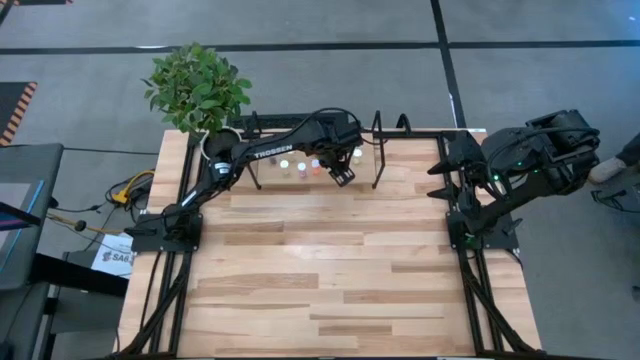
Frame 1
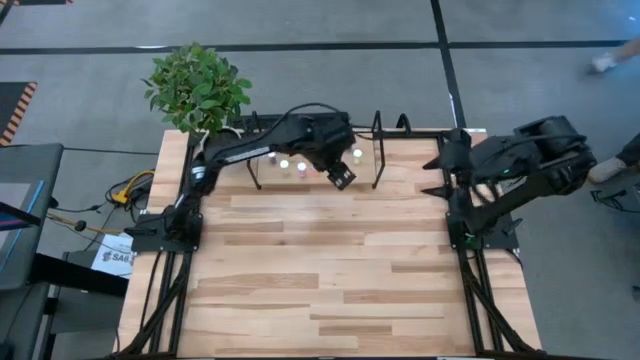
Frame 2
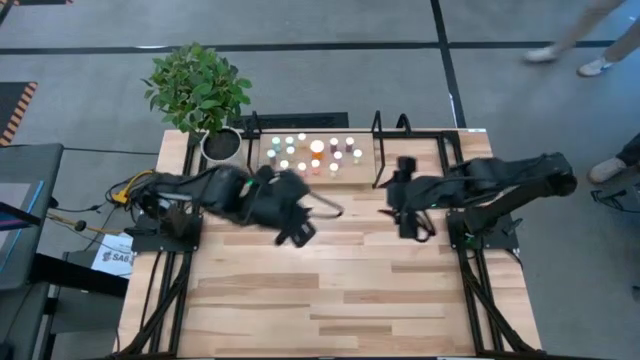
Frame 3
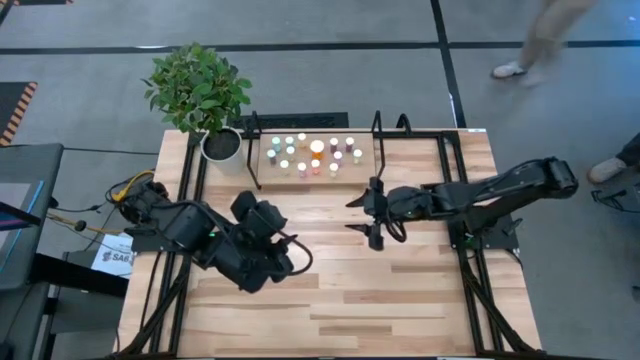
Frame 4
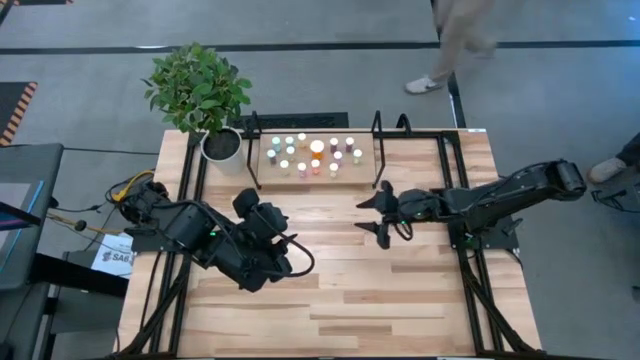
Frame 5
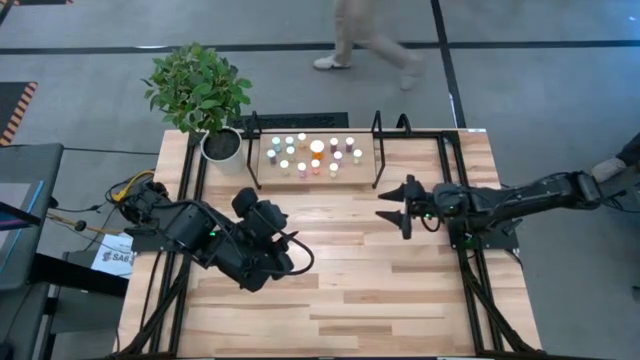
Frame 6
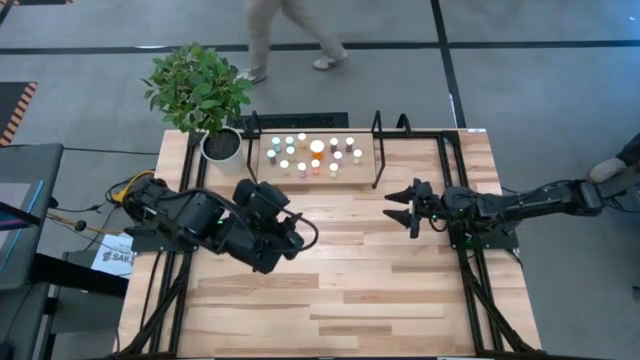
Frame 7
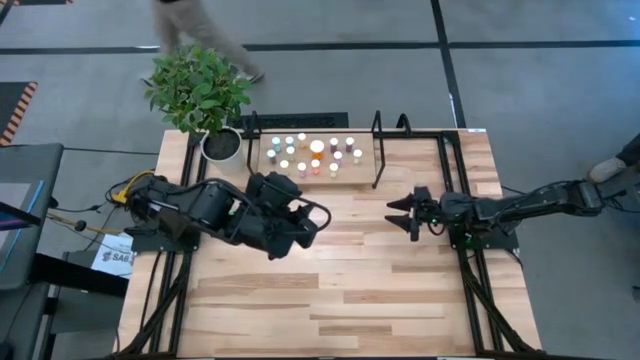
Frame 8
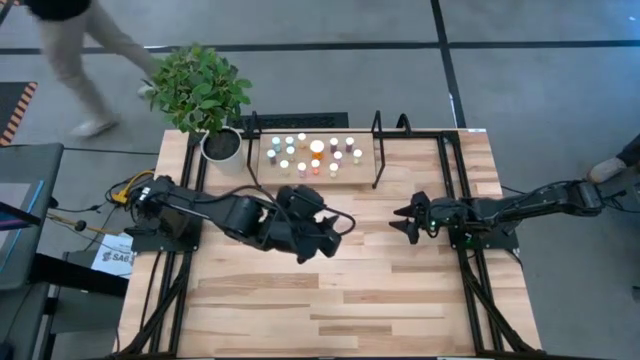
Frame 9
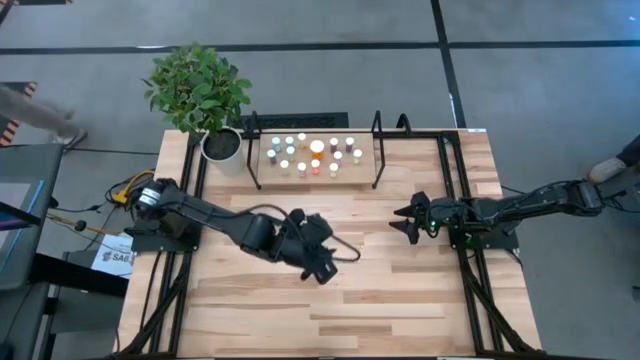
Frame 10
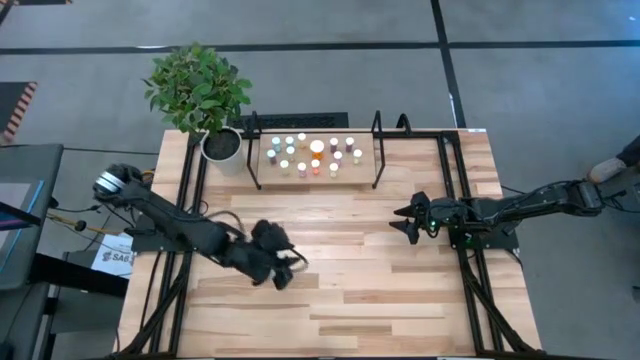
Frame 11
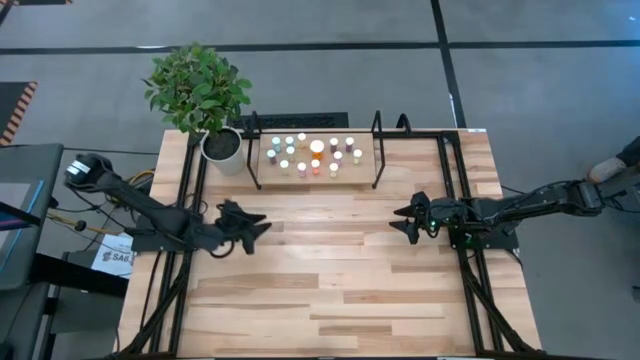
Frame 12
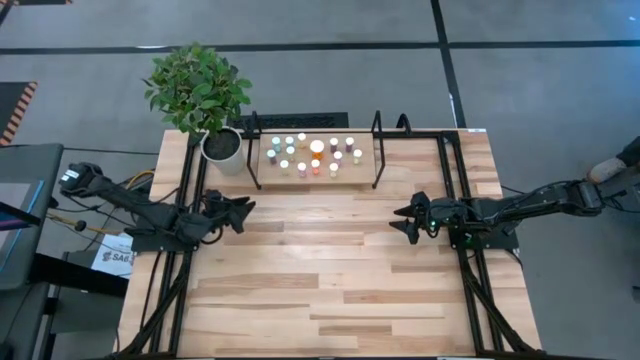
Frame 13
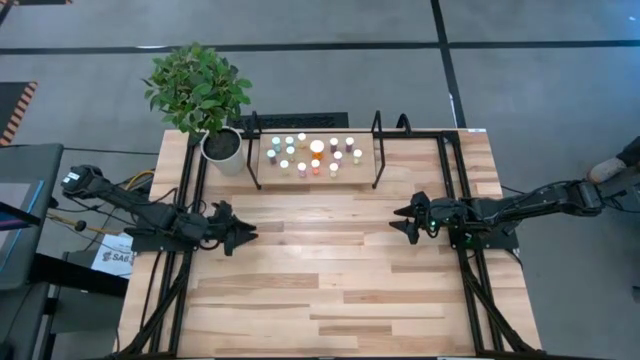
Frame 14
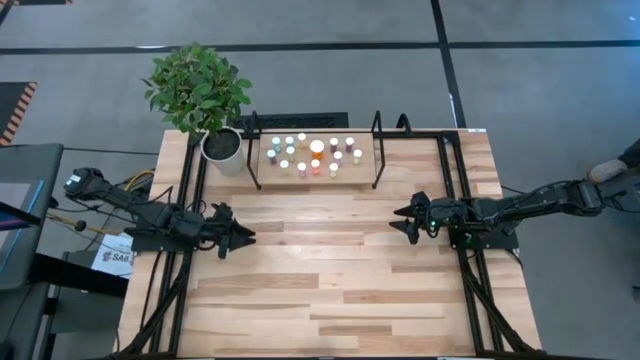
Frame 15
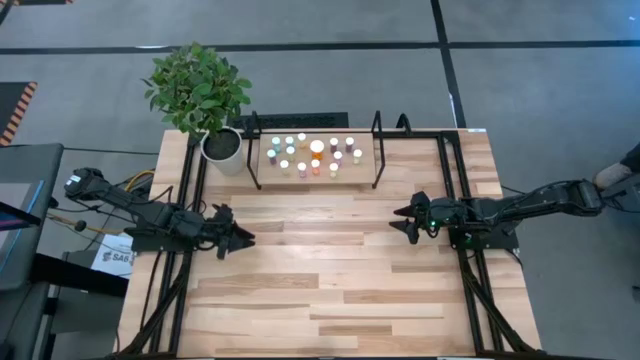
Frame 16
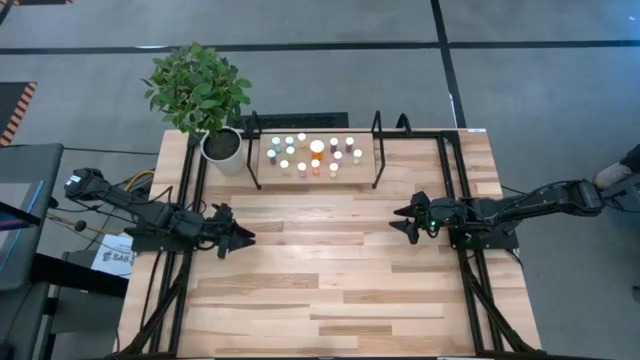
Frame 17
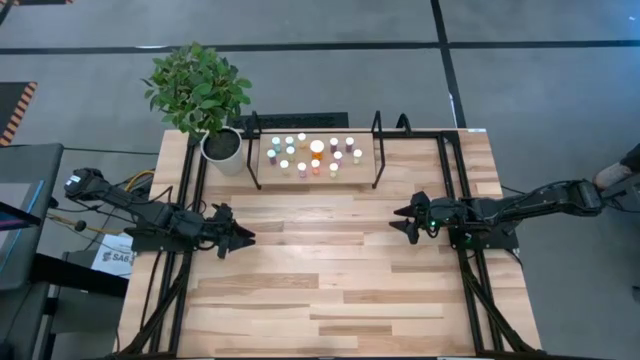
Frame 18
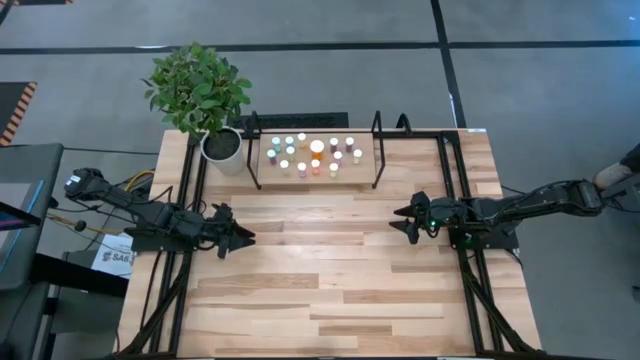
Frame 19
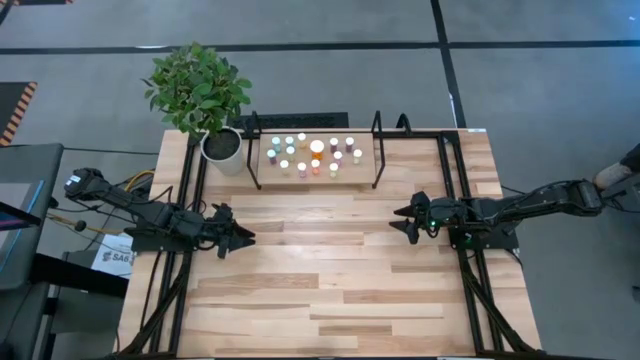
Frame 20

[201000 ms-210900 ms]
Task: Pick and place medicine bottles onto shelf by color
Return to Home Position

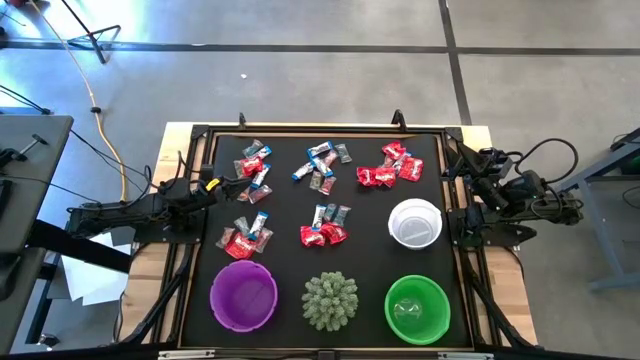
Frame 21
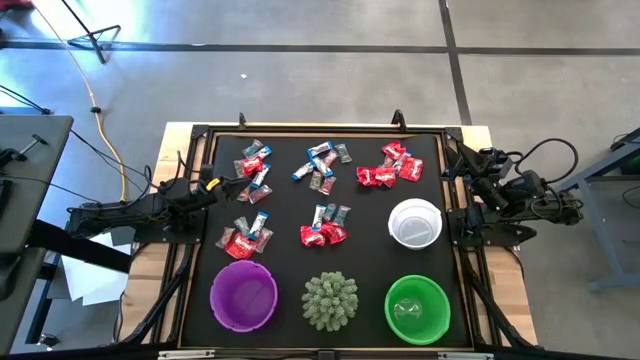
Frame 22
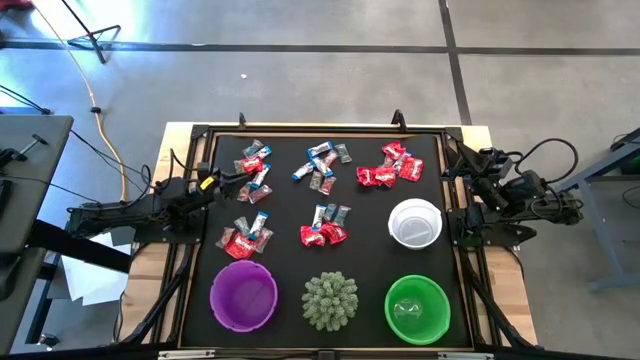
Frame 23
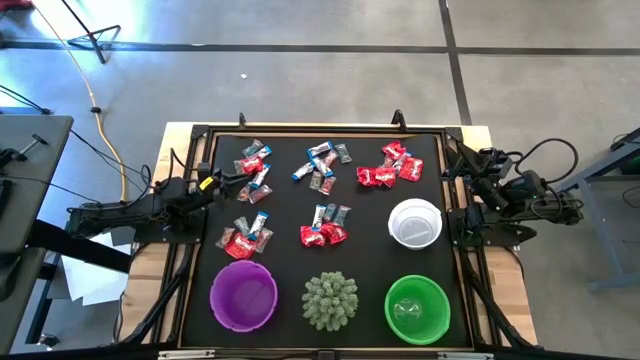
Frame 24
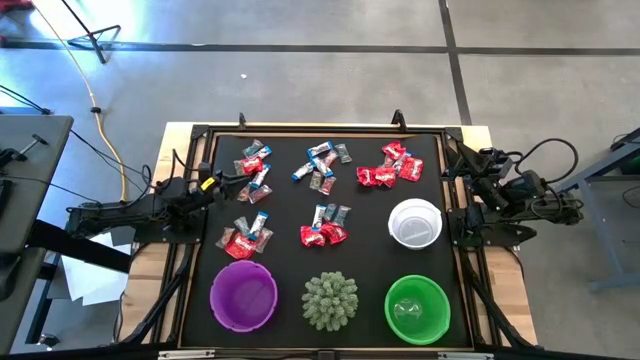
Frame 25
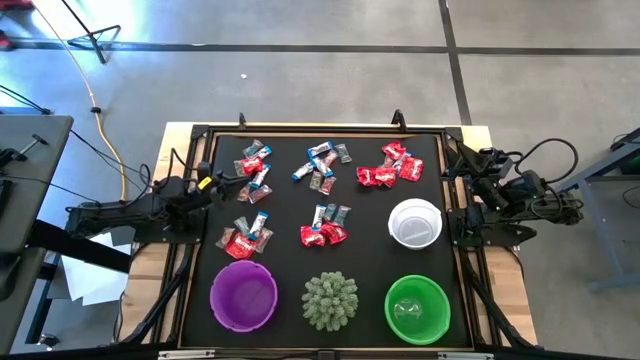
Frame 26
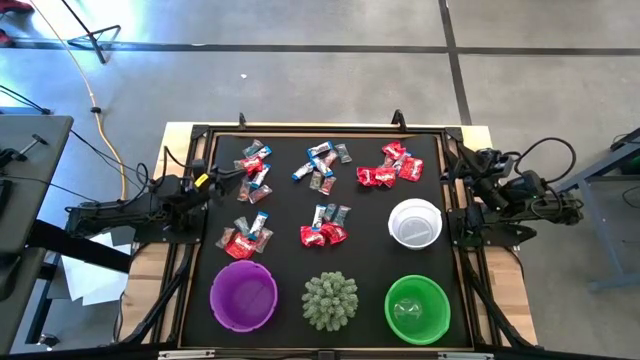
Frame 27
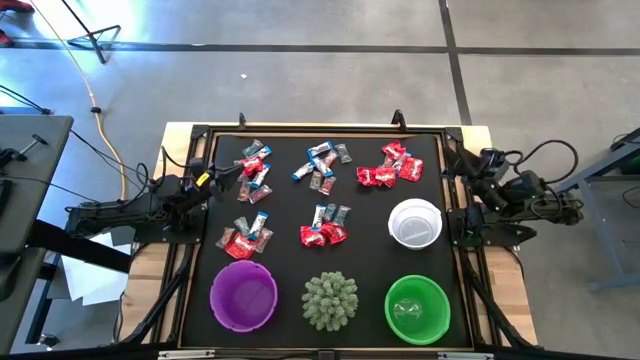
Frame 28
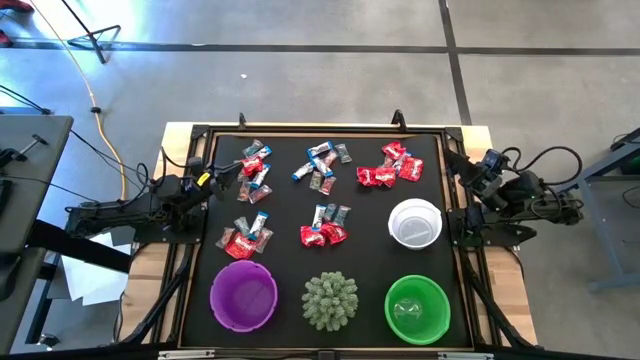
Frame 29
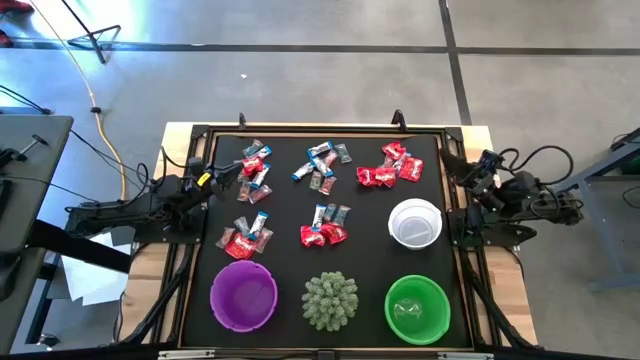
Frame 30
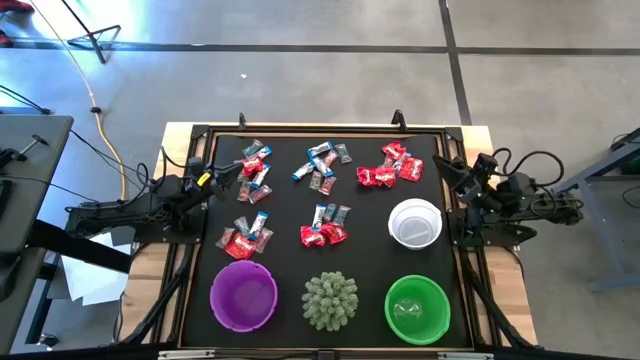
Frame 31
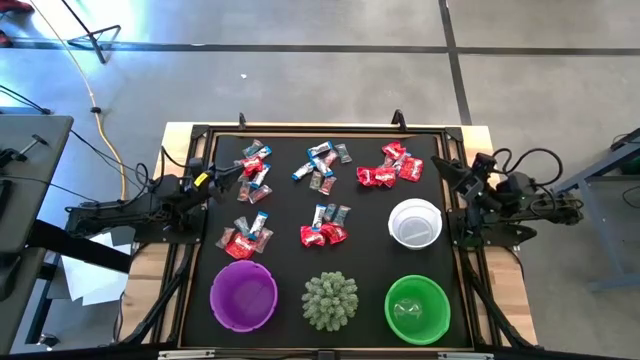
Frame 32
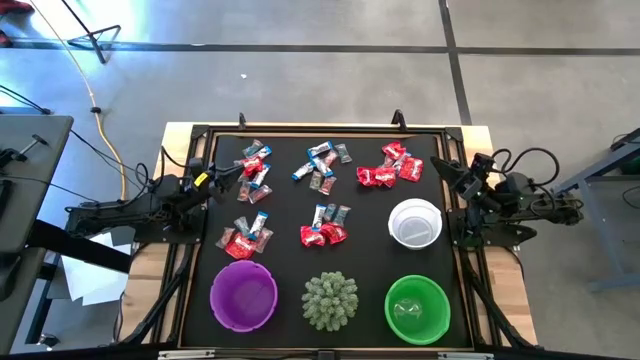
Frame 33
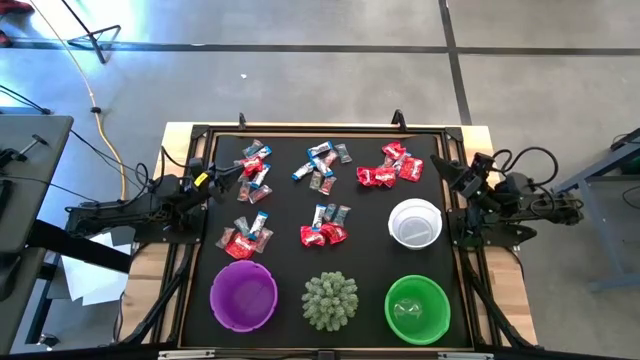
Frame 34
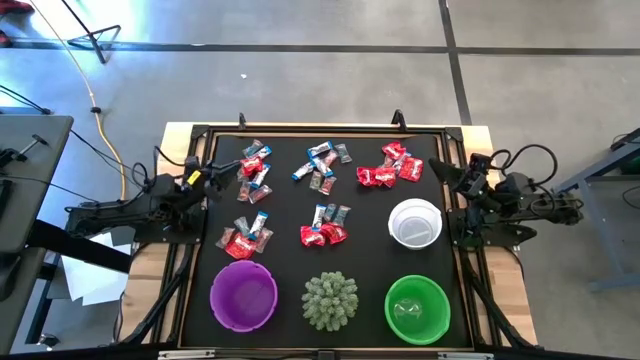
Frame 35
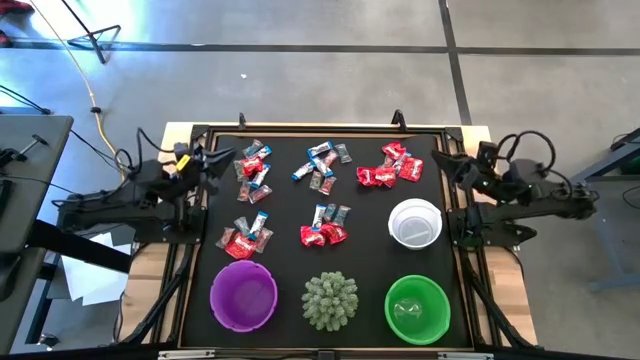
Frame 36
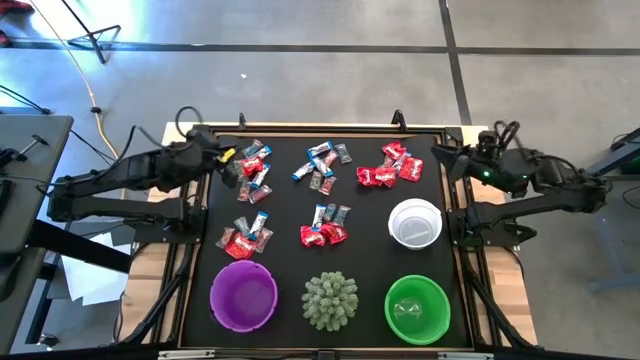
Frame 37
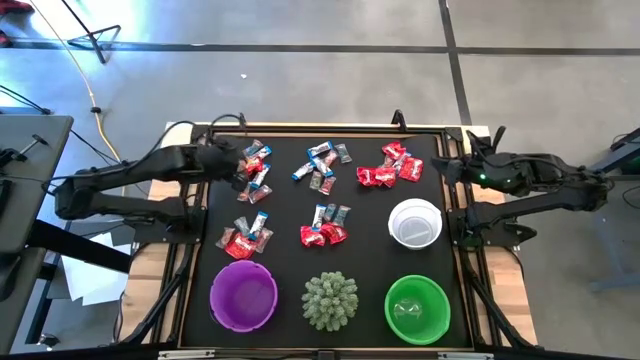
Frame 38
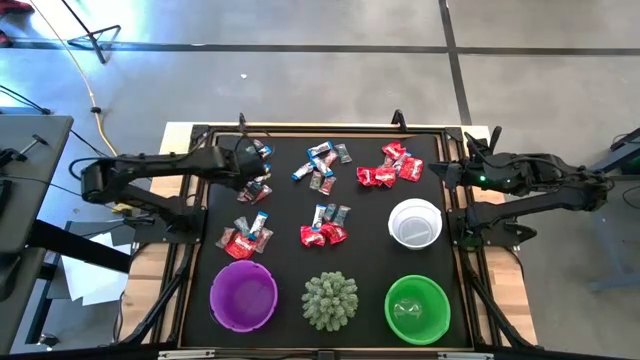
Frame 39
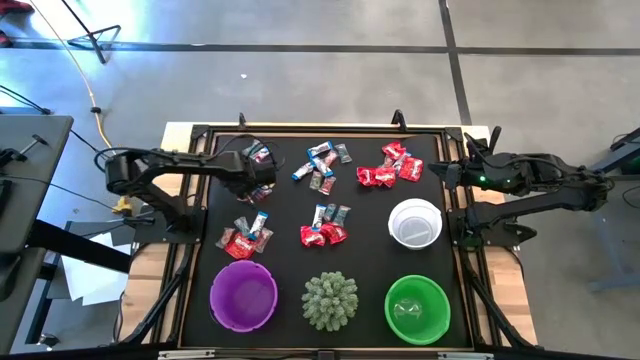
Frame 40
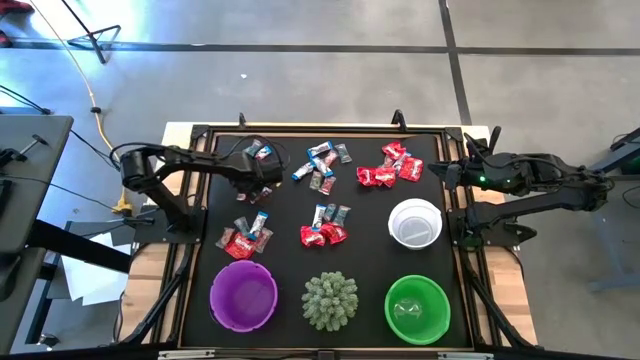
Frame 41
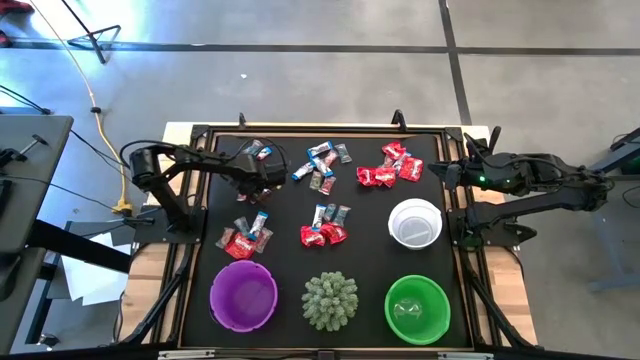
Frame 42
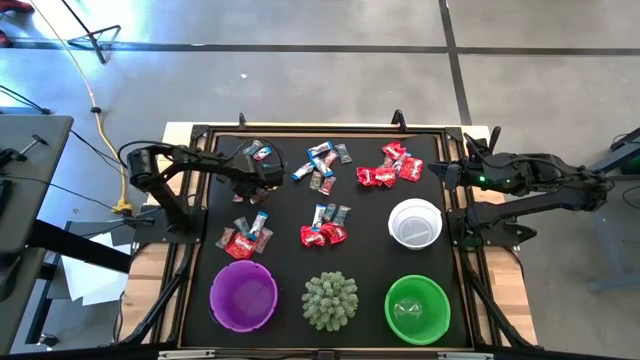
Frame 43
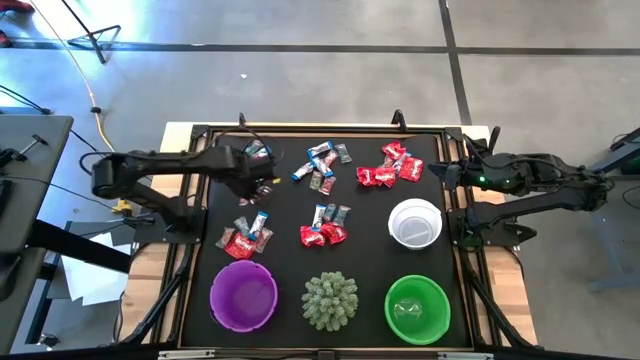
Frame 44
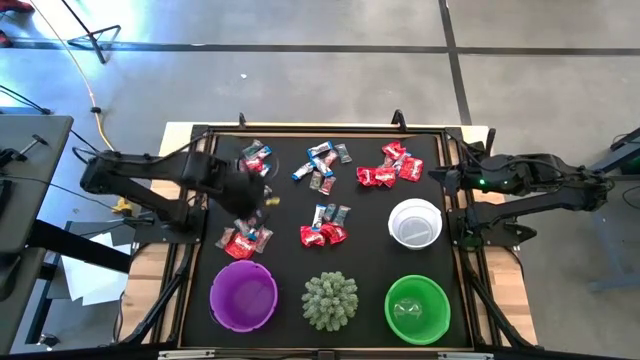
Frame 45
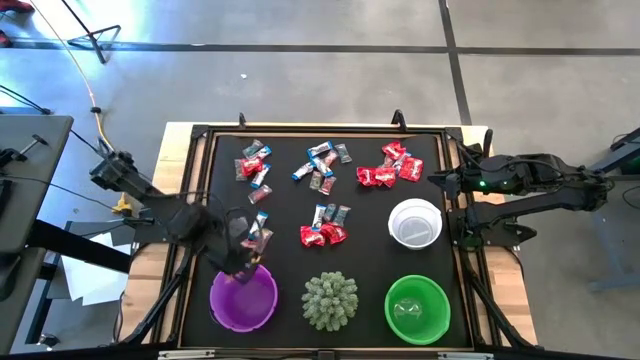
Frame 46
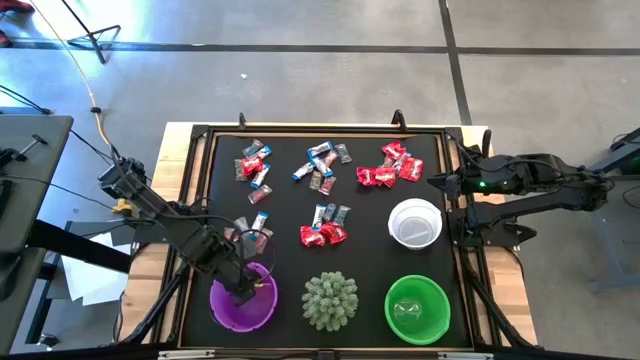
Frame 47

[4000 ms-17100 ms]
Task: Sort candy
Put the transparent candy wrapper into the purple bucket
